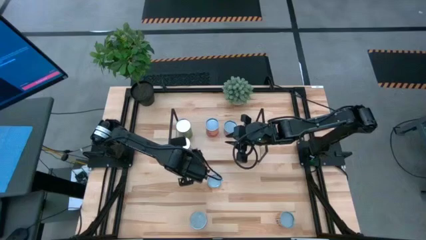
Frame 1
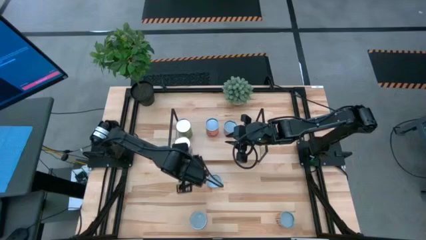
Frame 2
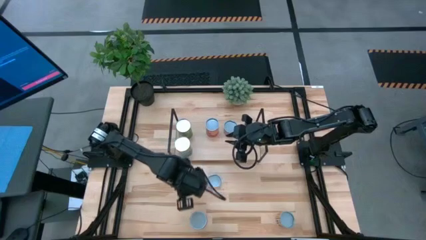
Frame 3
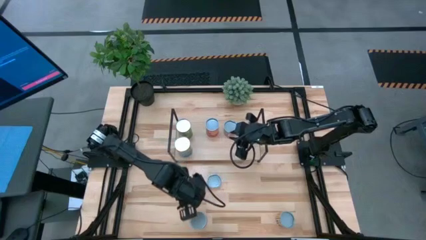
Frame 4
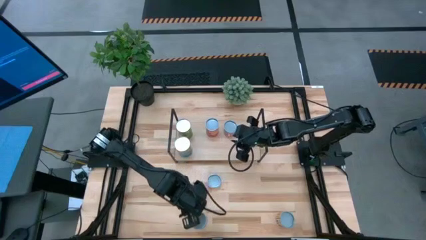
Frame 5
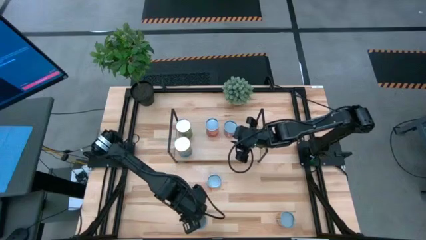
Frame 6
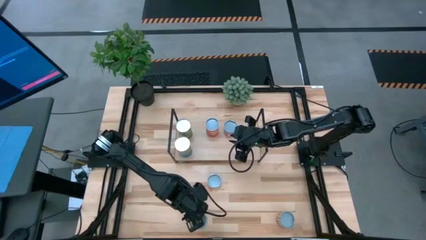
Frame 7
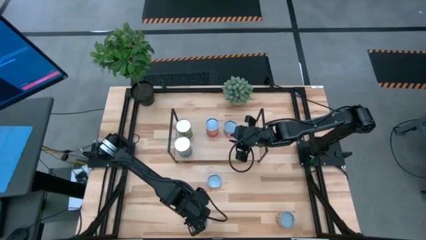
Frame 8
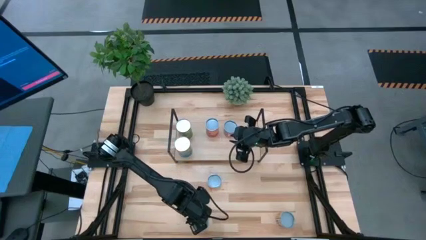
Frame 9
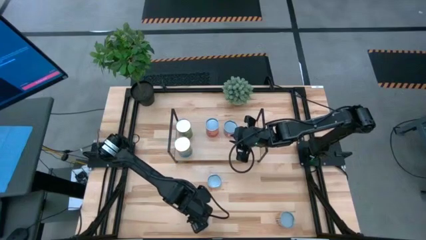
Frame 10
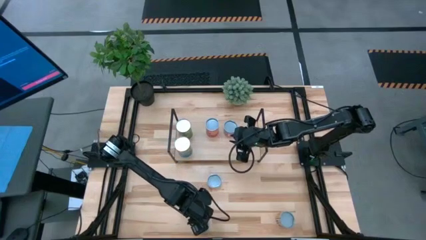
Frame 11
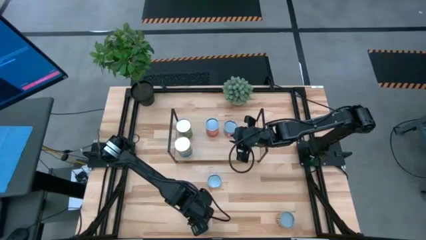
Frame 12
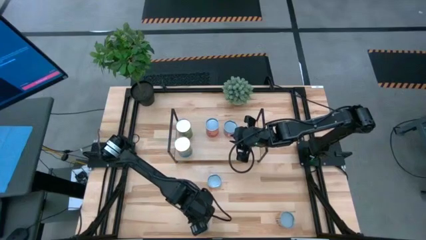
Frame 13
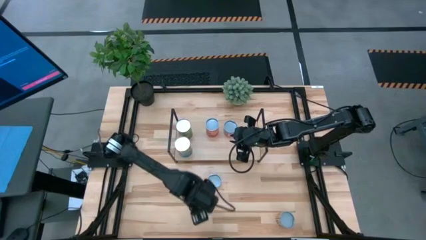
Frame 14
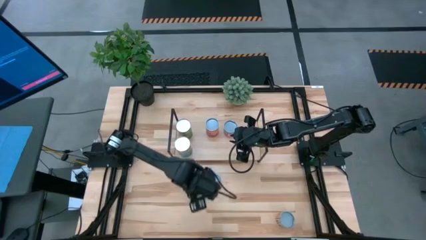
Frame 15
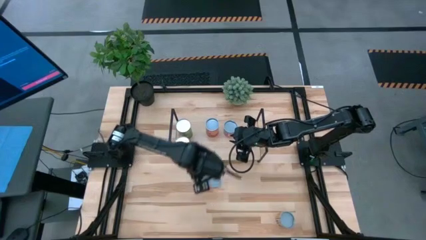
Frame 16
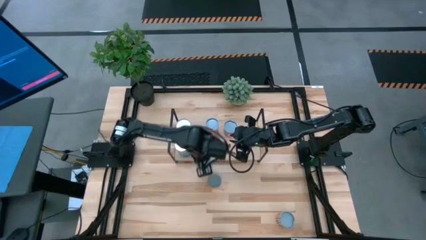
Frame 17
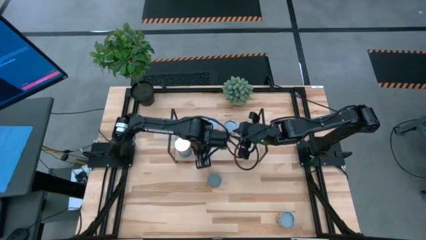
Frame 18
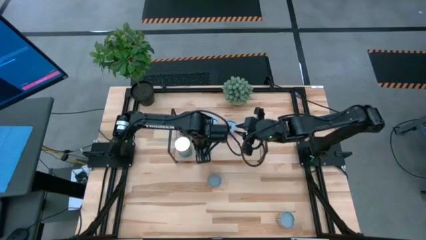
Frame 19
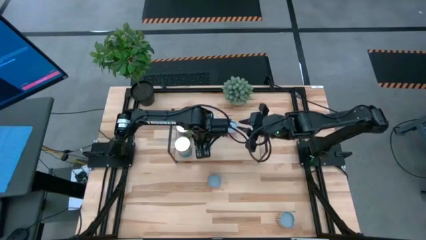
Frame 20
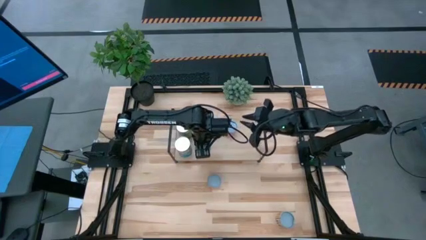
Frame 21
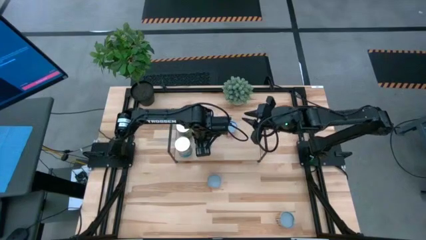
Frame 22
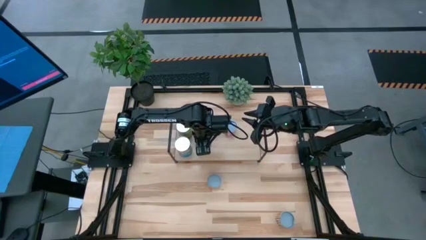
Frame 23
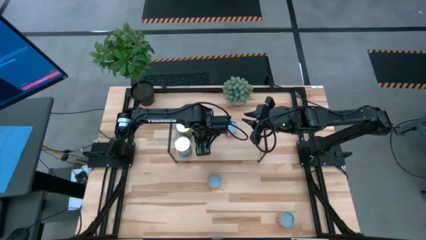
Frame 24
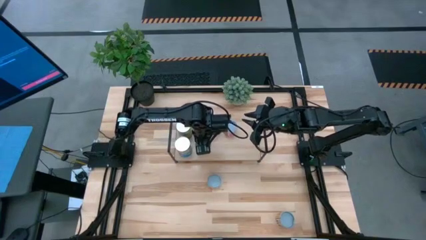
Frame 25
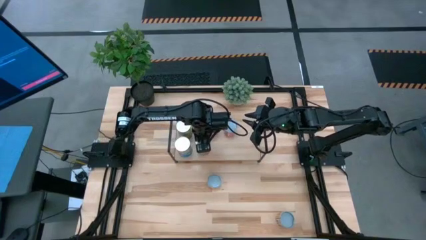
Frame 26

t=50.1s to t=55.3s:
Task: Pick and place cans onto a shelf
Put the canned green peas on the shelf

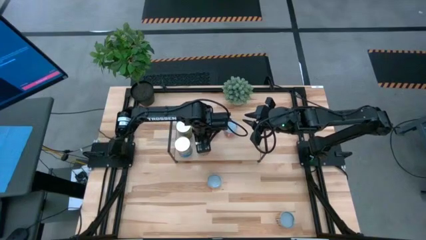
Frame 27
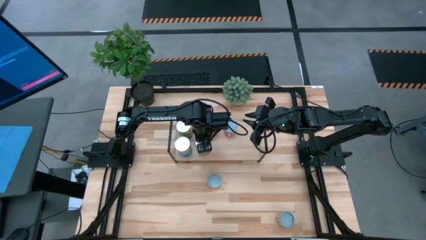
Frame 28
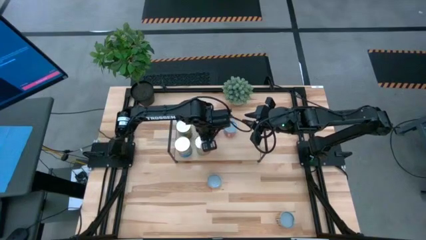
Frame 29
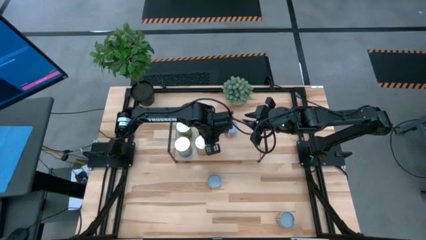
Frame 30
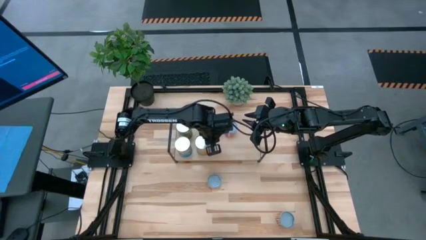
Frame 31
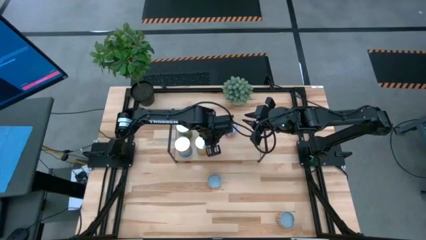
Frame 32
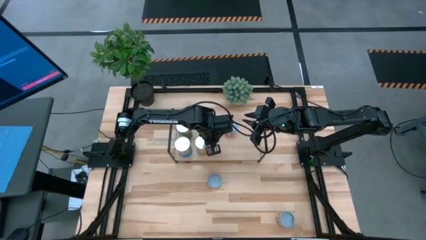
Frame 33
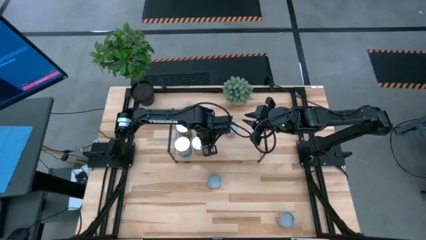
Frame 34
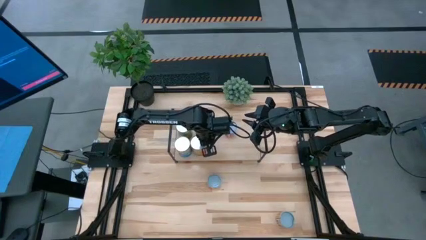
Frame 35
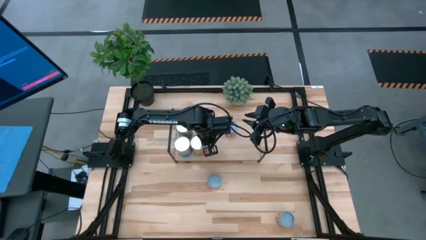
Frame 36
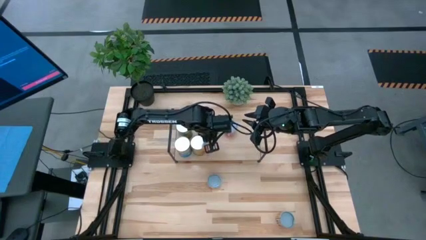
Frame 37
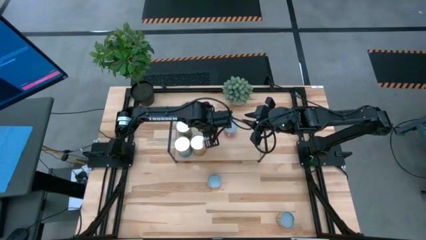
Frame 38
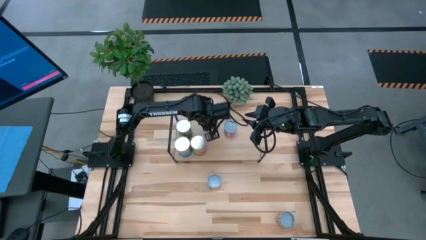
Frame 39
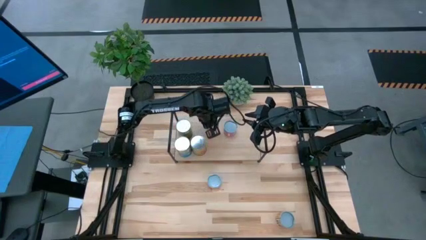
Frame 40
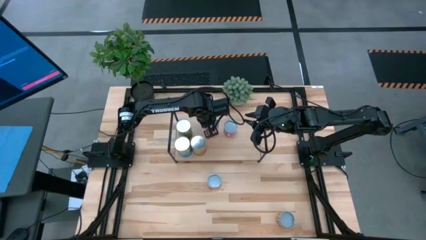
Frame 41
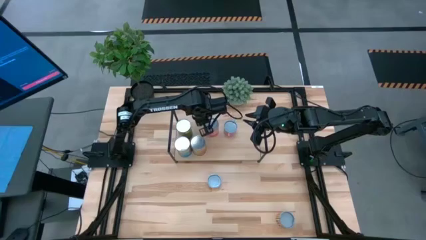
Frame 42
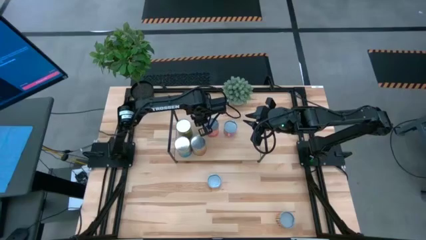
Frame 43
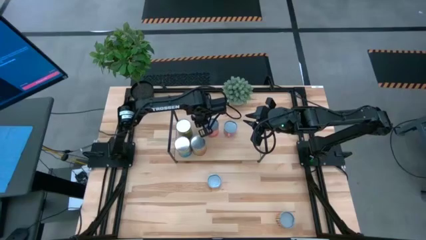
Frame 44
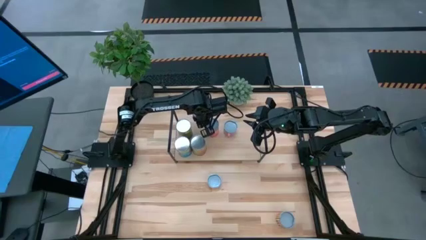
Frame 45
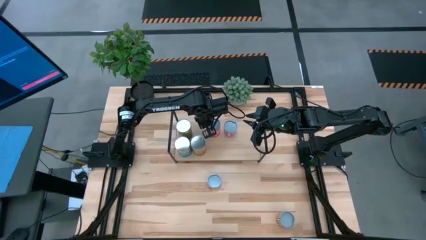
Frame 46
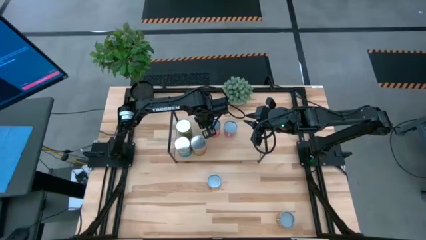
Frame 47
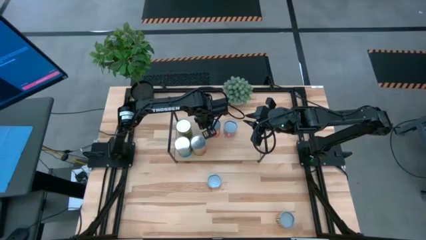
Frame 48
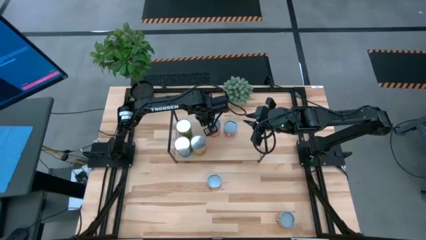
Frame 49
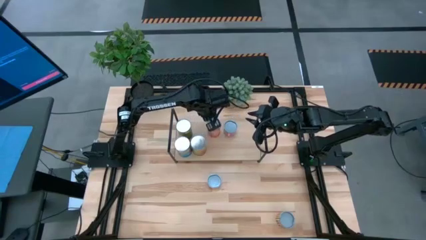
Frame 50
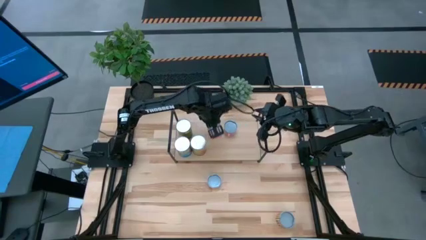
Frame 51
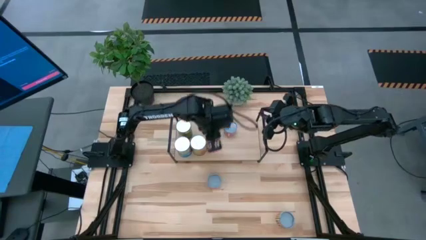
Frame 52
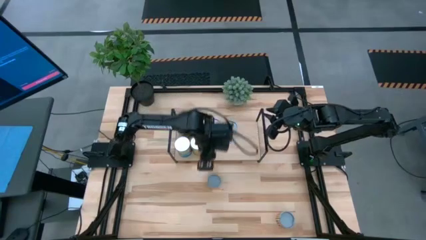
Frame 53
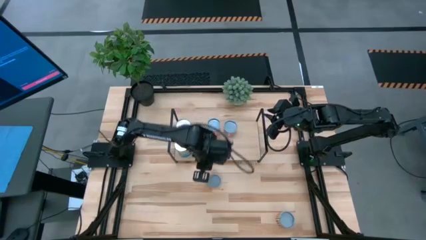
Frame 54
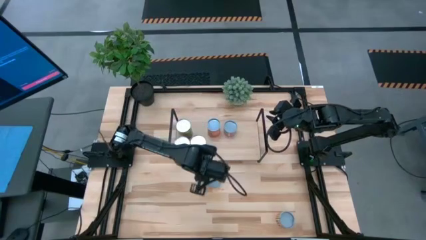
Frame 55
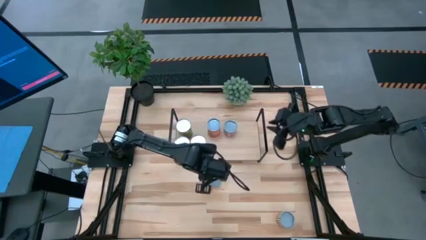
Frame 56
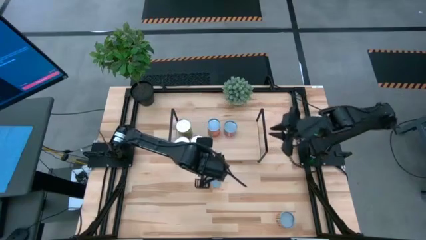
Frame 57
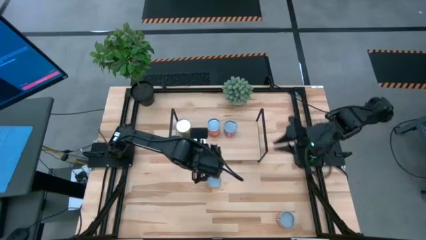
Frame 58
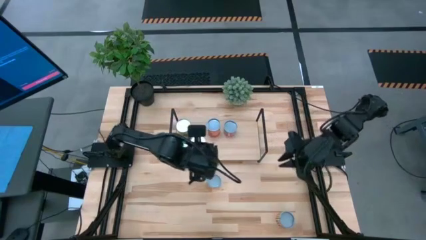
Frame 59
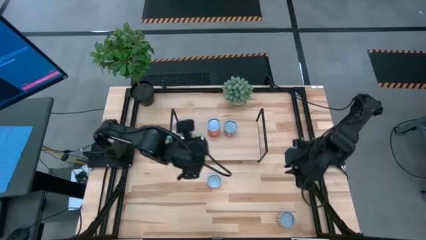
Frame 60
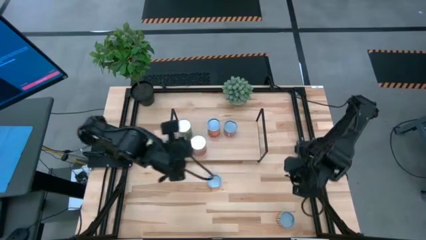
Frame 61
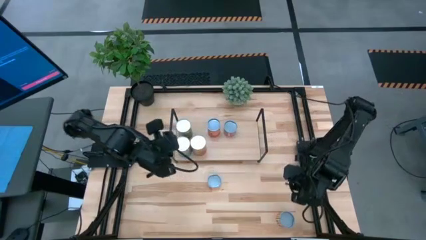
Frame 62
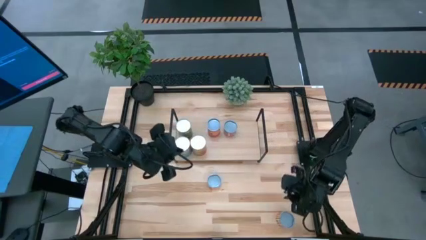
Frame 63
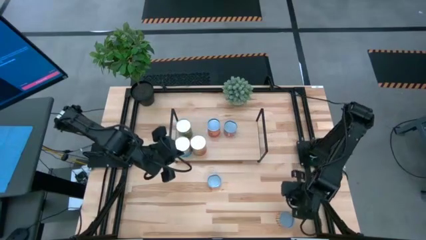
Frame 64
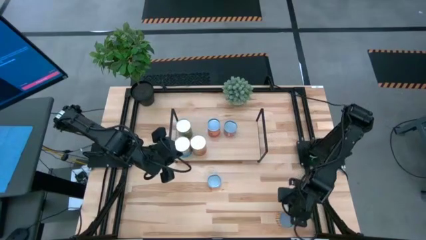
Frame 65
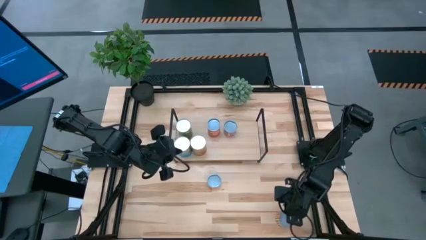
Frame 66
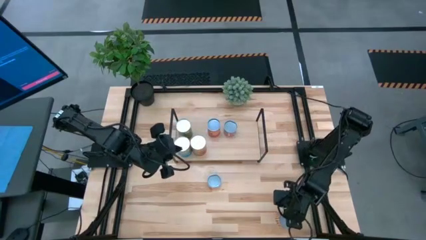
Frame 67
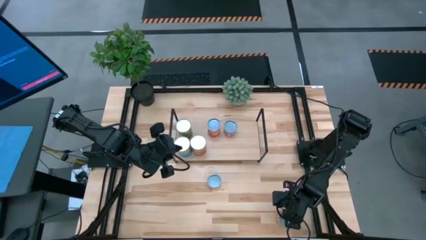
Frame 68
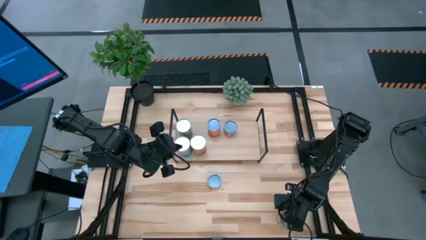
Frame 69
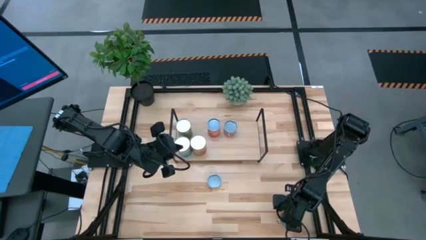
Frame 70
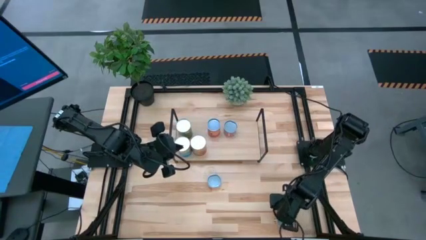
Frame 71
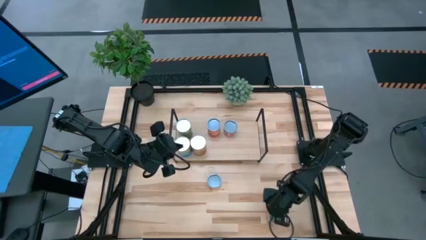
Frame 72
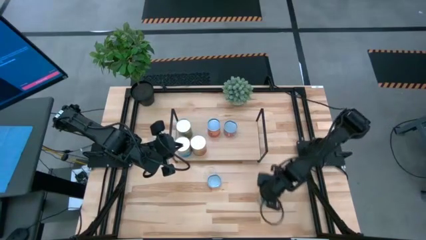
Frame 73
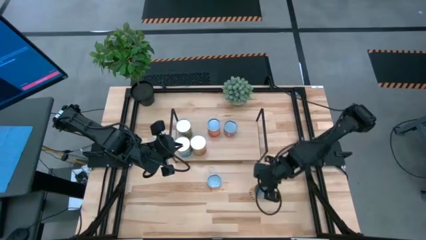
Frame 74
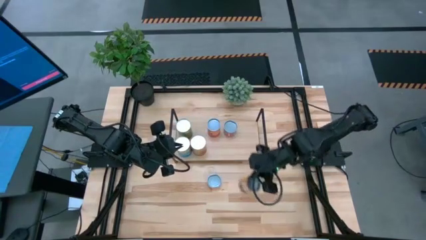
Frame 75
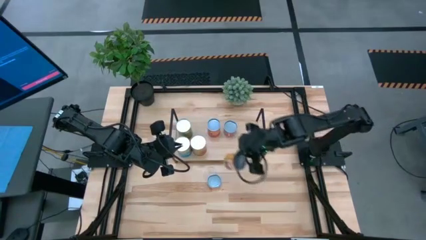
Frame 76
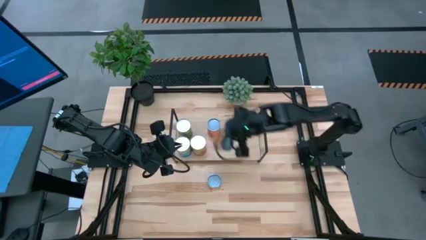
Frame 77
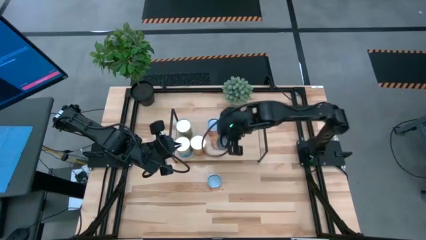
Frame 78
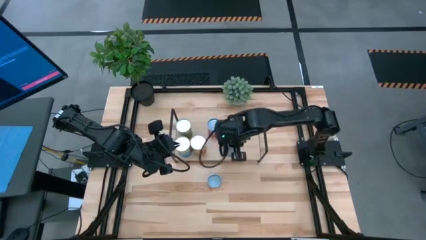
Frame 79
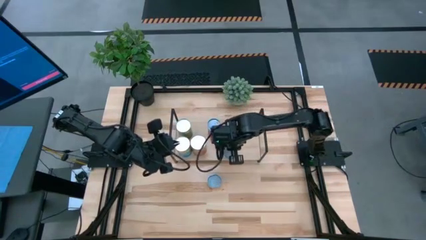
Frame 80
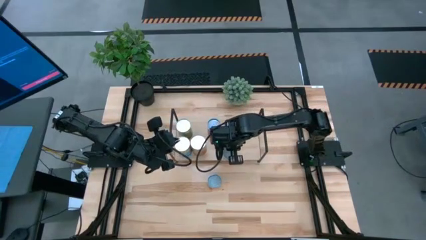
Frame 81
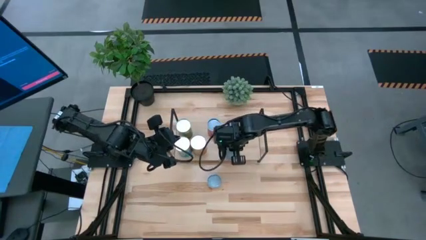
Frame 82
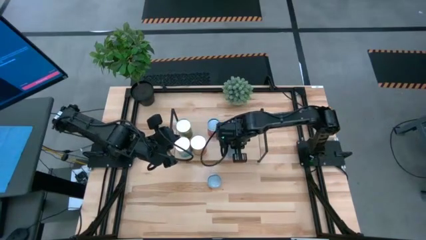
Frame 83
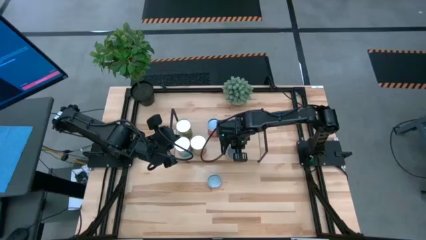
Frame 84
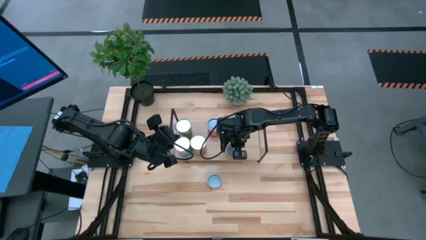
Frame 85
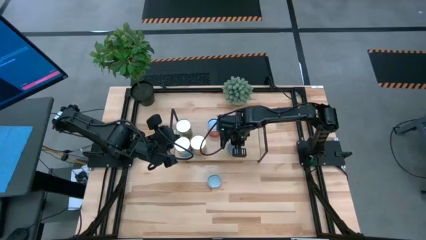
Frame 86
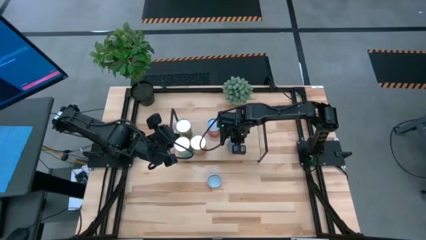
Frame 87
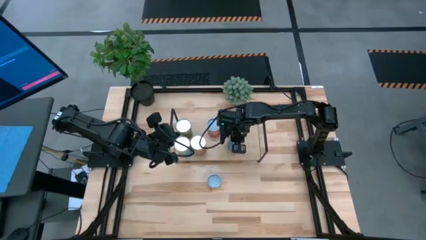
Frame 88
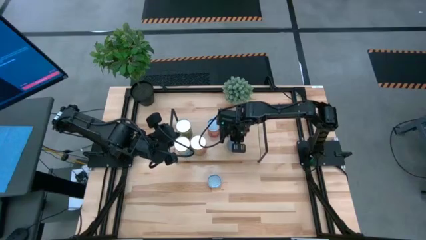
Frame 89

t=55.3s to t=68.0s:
Put the canned spicy black beans on the shelf
